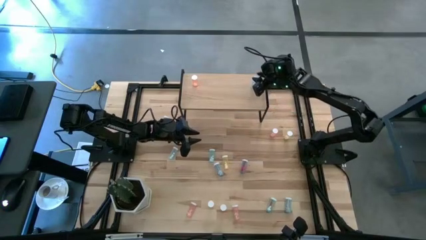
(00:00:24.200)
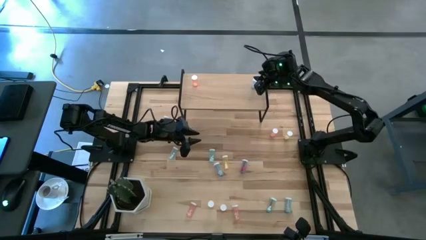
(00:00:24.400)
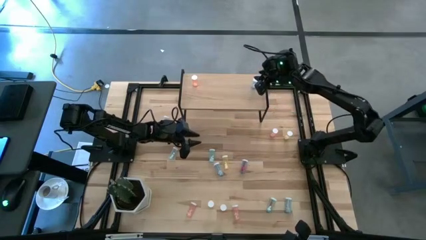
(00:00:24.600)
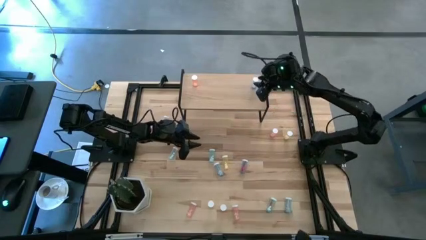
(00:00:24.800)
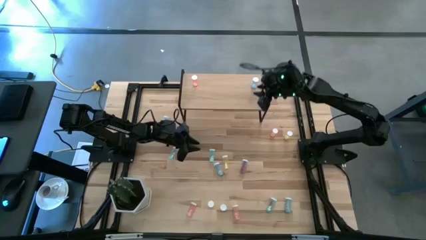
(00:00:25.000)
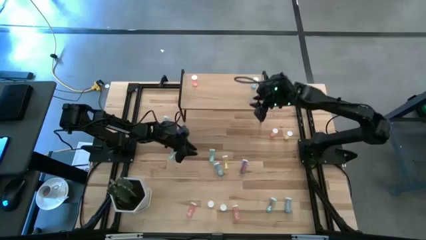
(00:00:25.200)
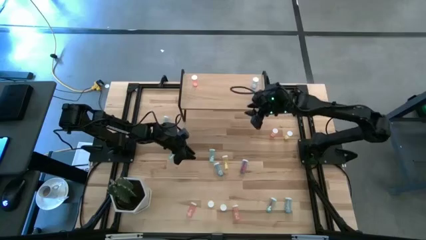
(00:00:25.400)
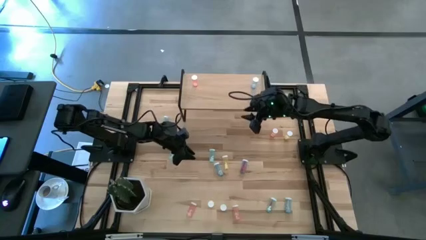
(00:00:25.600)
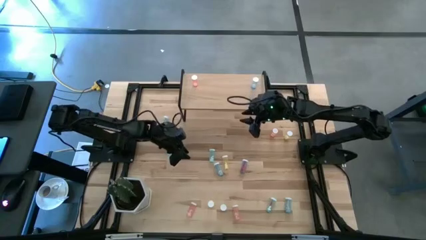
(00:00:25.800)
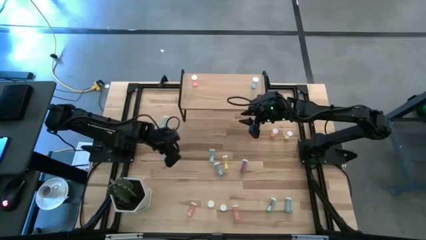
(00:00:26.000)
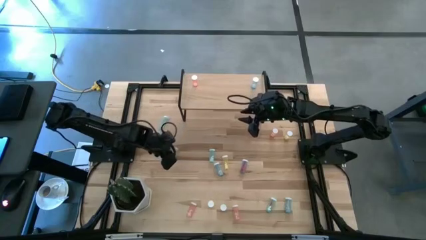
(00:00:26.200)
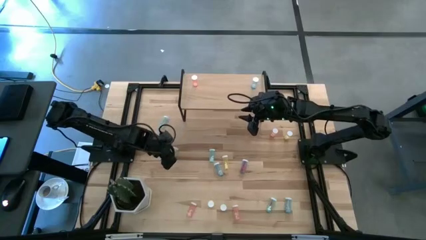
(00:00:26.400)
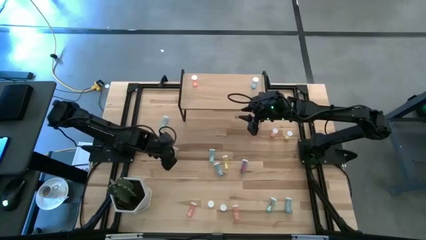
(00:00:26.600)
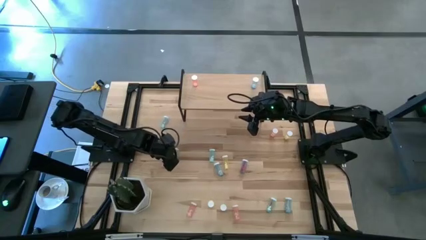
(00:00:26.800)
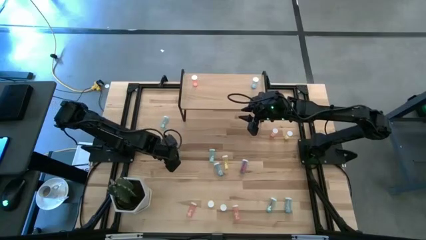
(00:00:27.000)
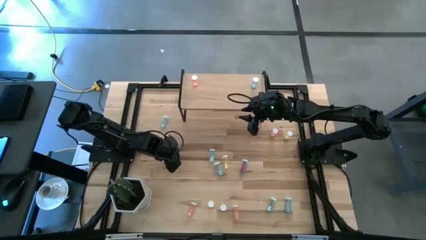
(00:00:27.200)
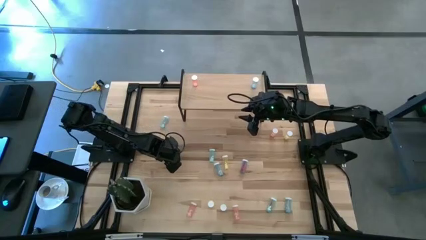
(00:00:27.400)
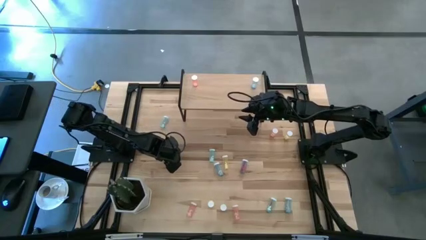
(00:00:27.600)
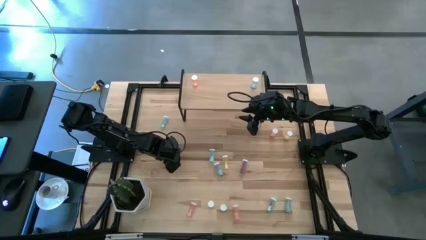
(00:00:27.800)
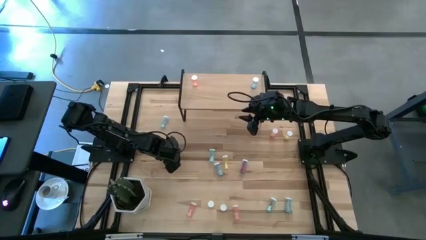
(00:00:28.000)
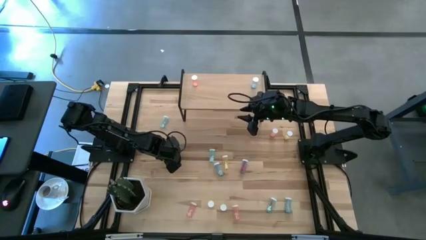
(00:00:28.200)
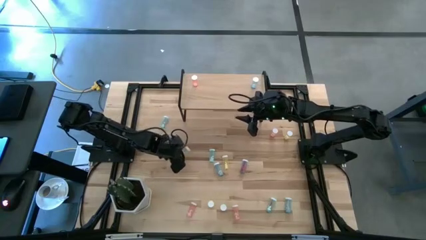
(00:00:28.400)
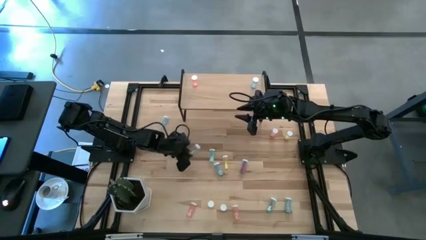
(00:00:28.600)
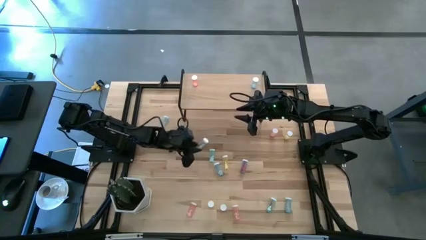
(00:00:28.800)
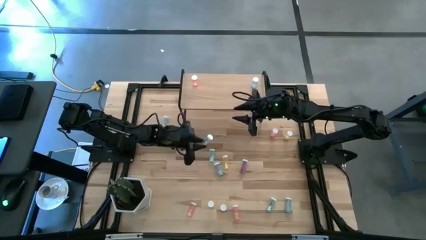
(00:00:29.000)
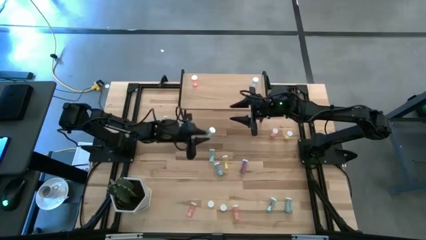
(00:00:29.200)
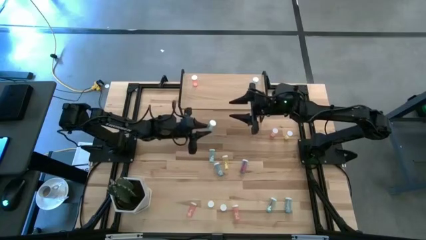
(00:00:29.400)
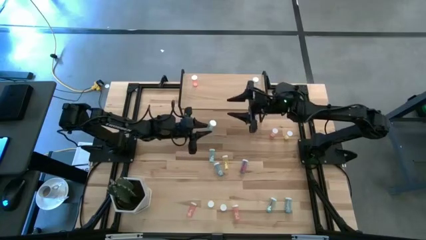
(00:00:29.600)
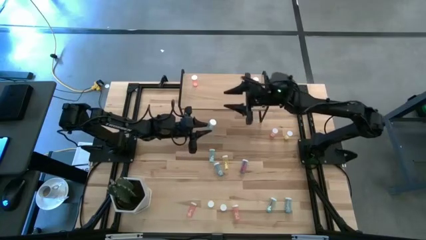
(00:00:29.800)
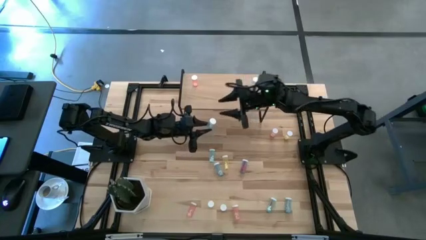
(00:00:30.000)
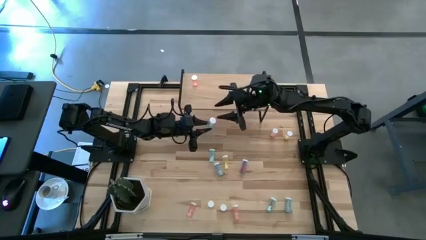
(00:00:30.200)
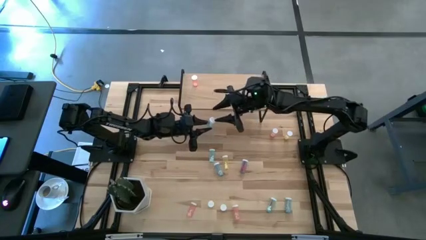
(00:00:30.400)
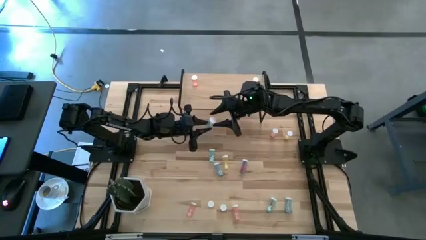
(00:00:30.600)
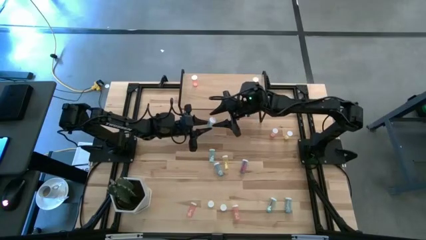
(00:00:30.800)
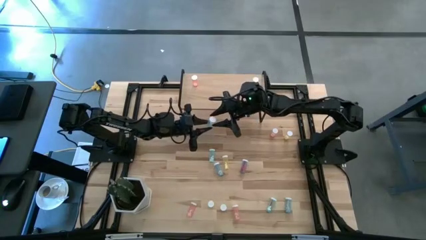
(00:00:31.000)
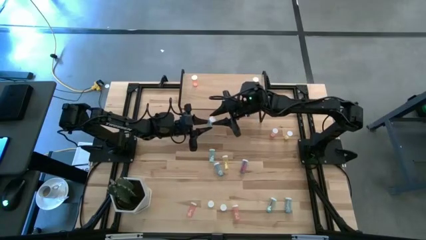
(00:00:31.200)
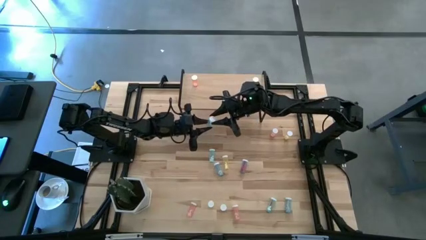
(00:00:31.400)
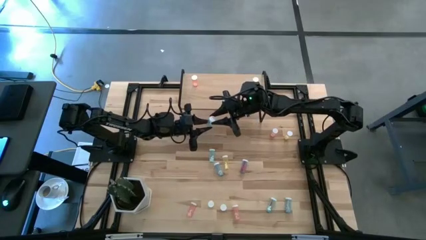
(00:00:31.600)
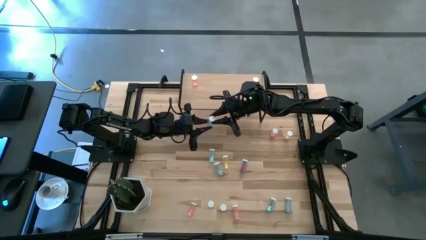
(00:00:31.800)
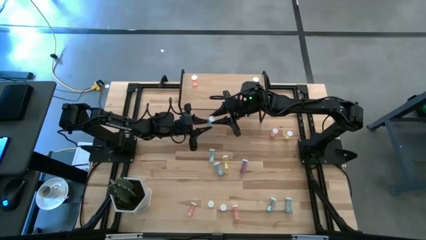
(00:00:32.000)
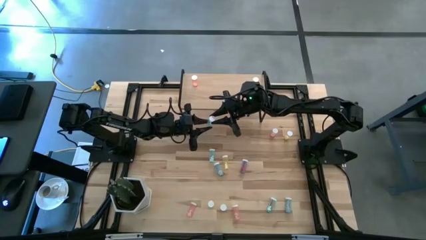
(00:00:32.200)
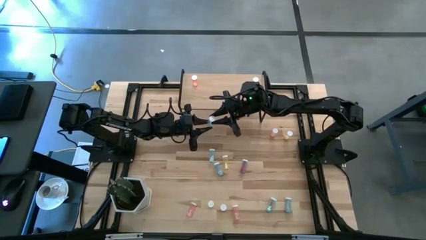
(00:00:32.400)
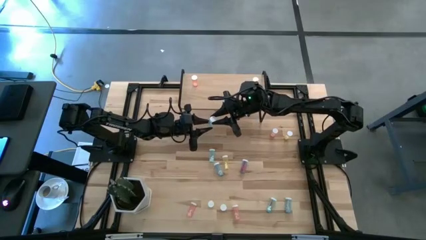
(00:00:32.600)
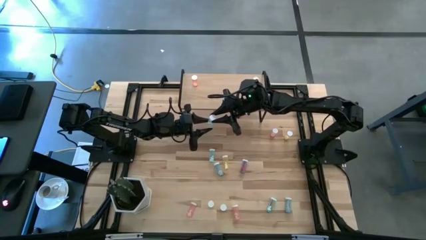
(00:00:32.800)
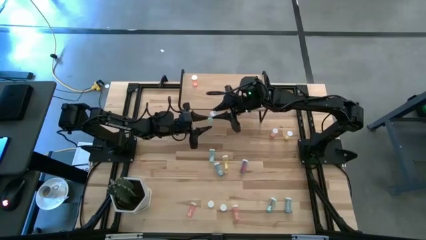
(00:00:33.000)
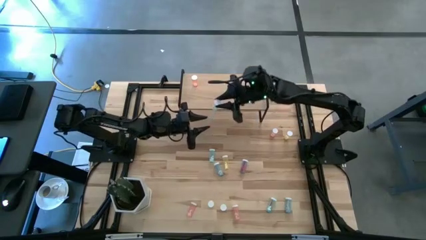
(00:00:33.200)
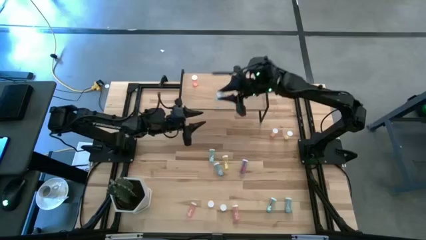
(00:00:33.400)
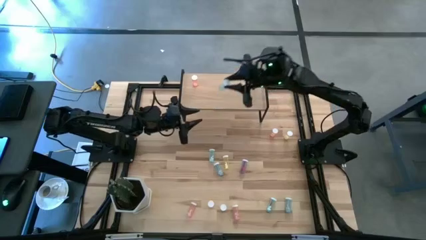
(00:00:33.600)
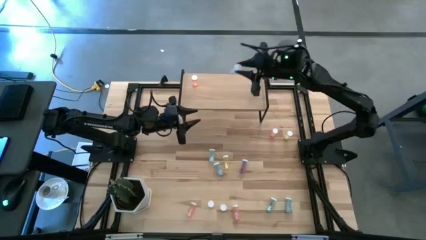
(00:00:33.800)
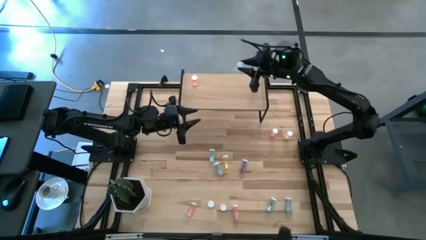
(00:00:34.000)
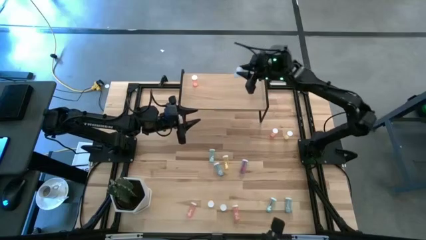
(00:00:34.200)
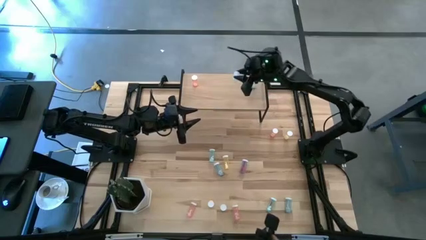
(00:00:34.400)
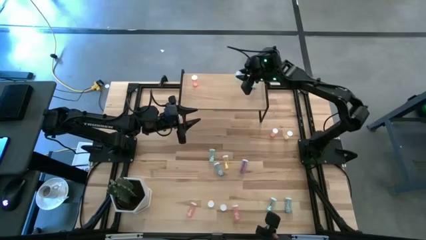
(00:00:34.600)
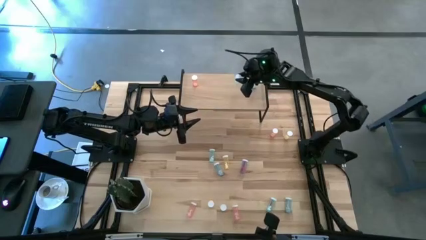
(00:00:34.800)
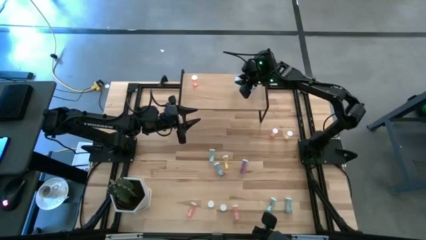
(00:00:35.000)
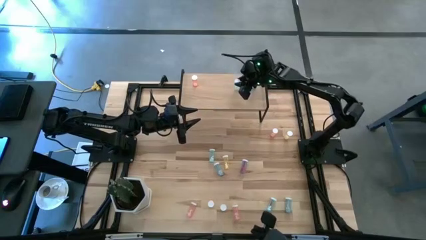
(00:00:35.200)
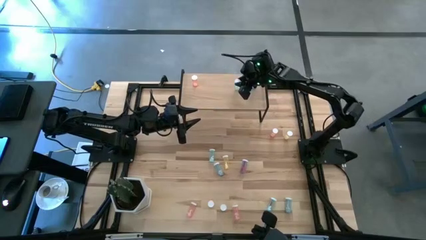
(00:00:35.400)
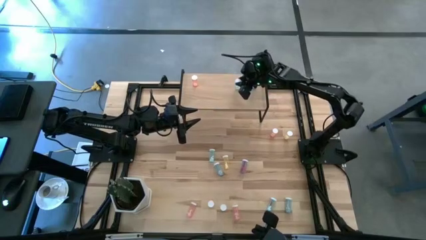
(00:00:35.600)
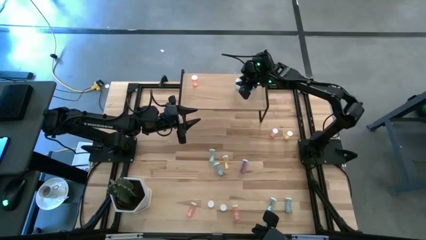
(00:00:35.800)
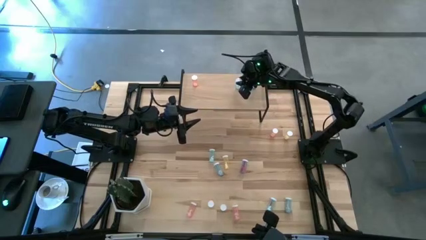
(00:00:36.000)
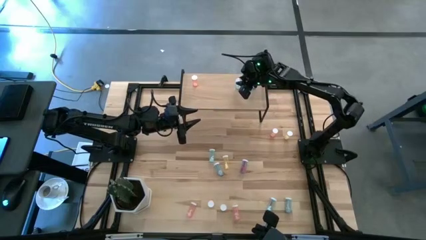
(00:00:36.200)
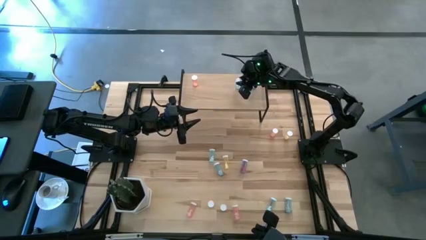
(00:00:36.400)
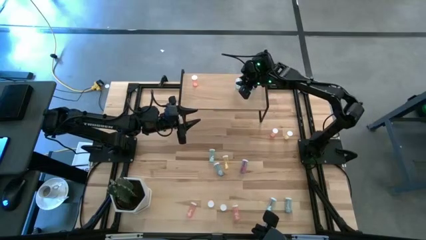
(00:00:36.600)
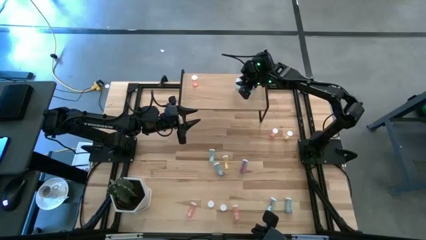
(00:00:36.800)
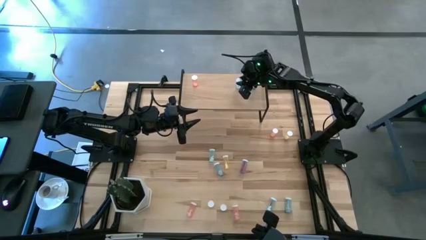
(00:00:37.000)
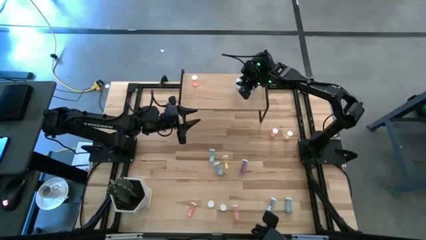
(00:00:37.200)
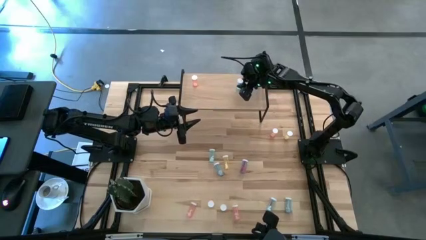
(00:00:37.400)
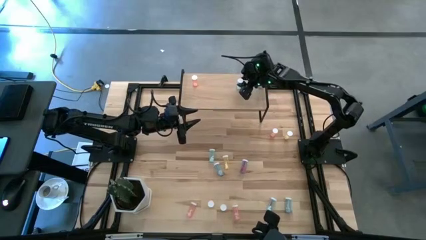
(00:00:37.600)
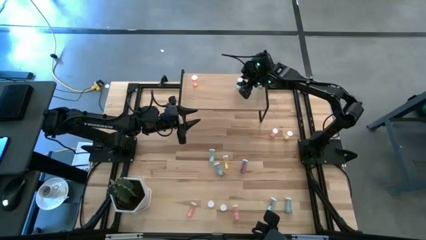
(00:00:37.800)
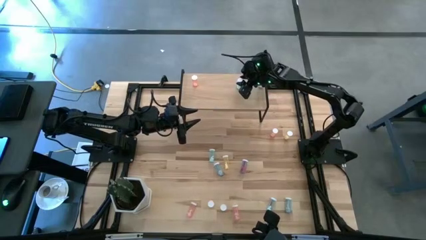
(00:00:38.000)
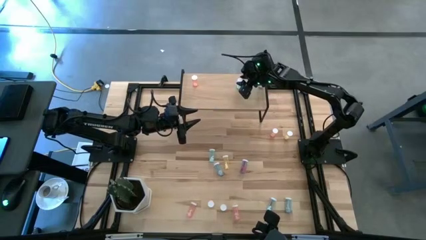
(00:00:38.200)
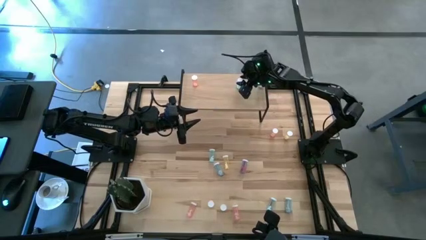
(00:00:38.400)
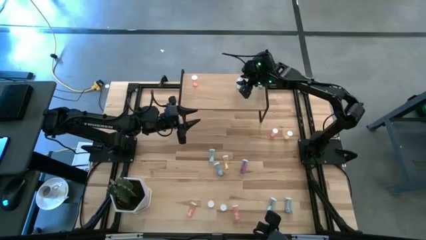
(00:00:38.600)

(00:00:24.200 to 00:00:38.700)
Task: Pick and place medicine bottles onto shelf by color
Put the light blue pill bottle on the shelf
